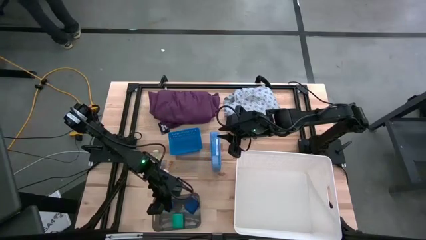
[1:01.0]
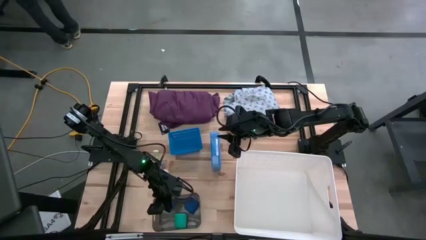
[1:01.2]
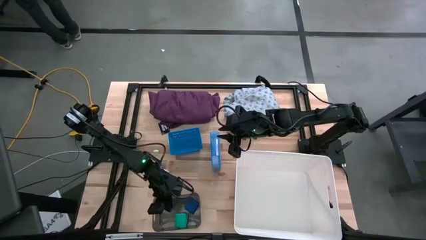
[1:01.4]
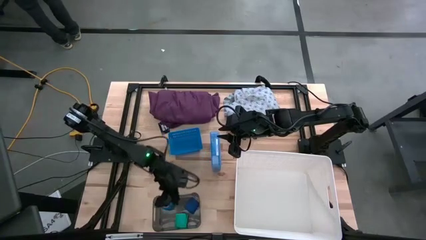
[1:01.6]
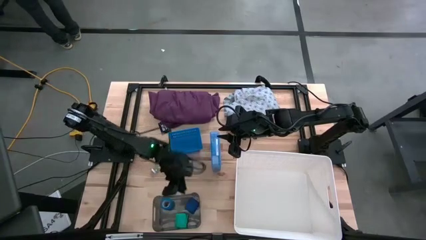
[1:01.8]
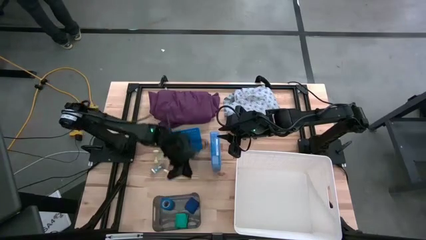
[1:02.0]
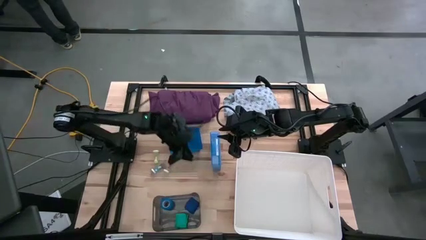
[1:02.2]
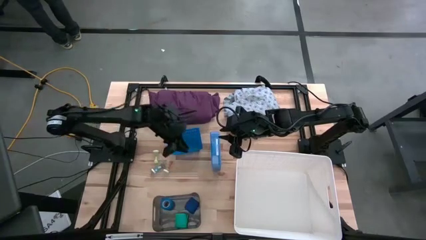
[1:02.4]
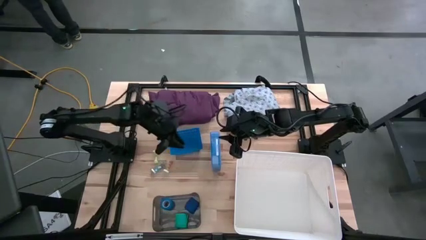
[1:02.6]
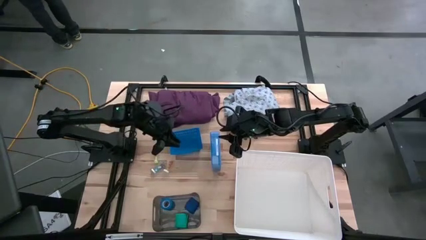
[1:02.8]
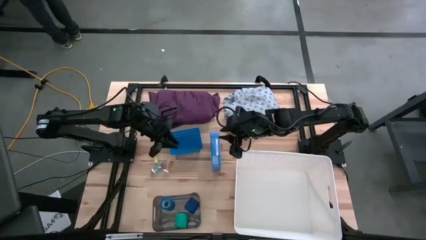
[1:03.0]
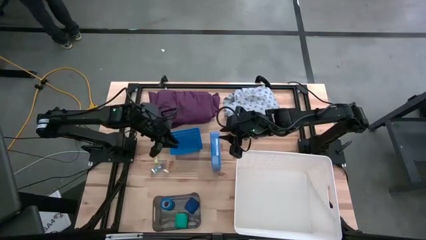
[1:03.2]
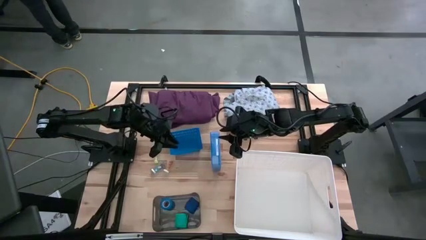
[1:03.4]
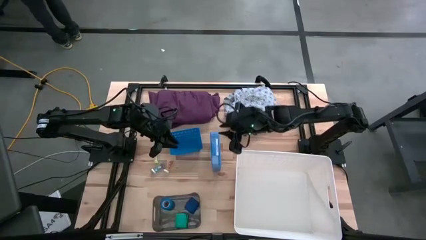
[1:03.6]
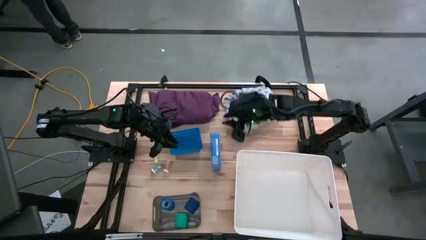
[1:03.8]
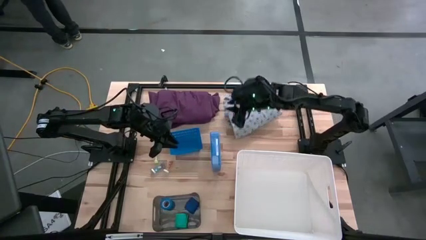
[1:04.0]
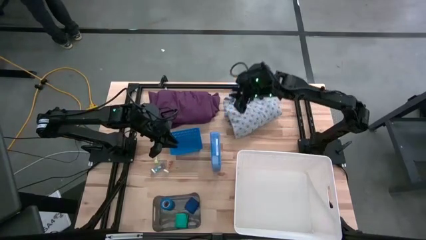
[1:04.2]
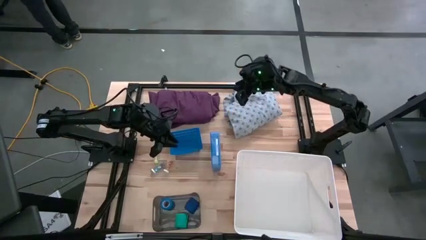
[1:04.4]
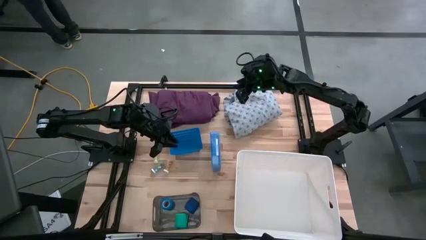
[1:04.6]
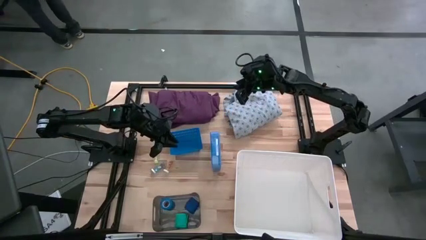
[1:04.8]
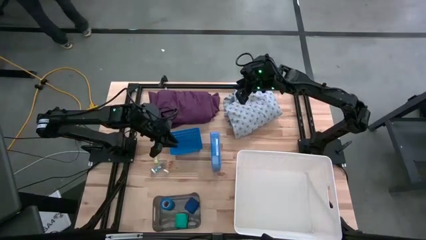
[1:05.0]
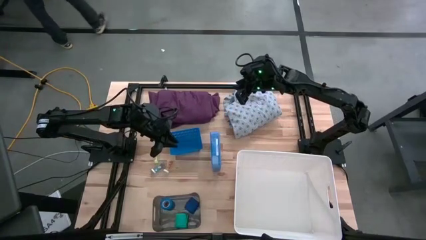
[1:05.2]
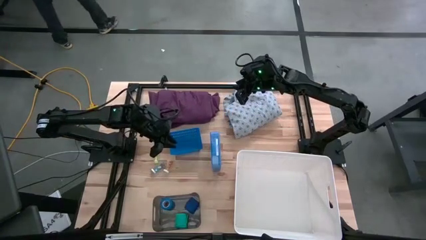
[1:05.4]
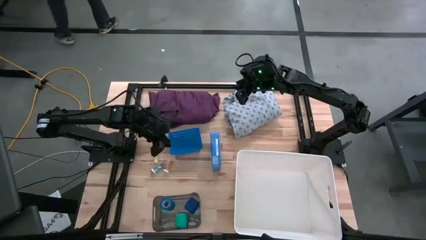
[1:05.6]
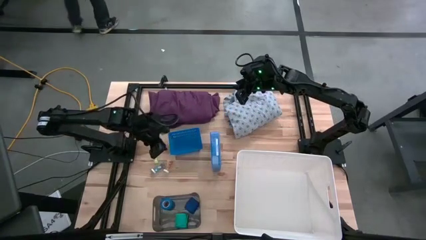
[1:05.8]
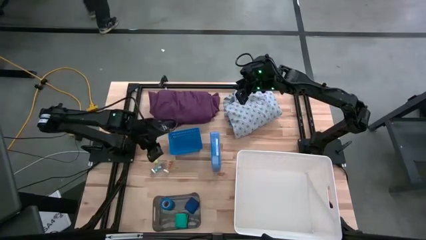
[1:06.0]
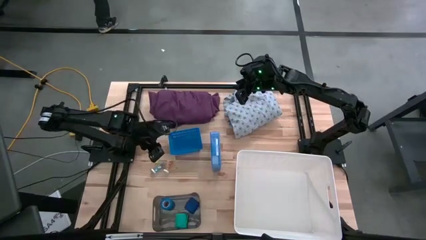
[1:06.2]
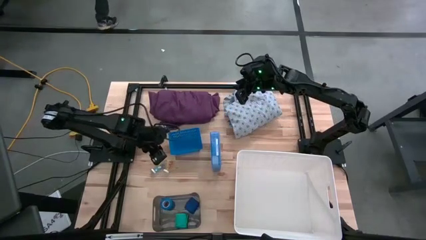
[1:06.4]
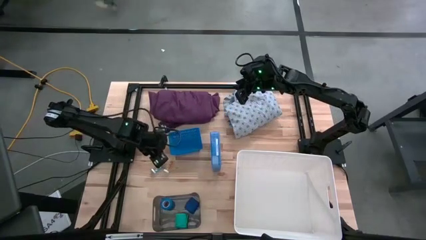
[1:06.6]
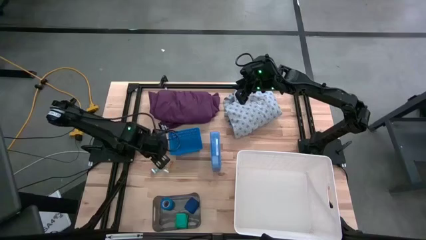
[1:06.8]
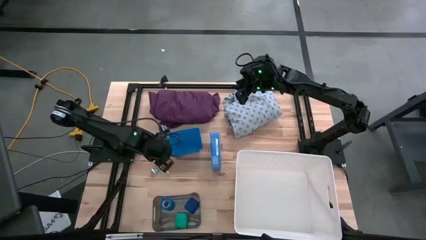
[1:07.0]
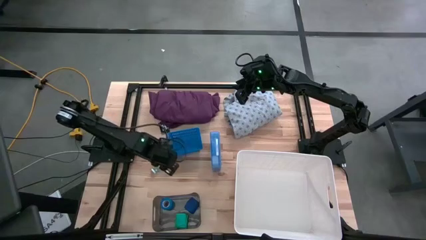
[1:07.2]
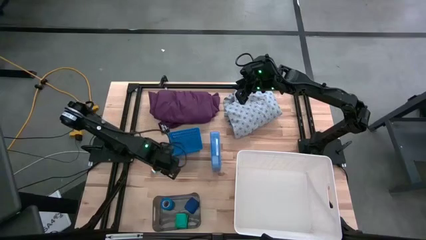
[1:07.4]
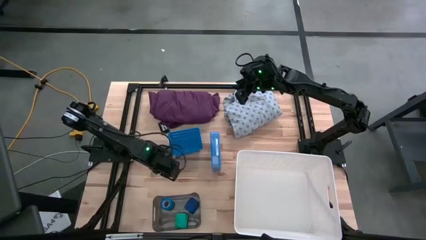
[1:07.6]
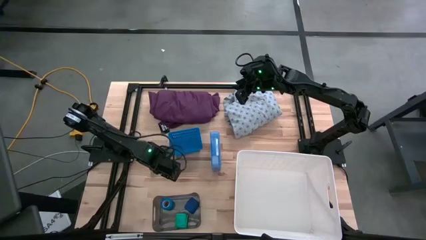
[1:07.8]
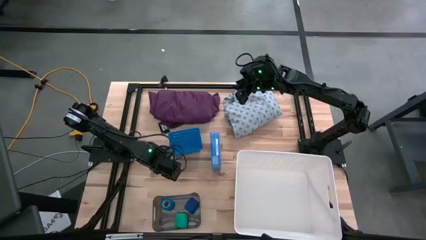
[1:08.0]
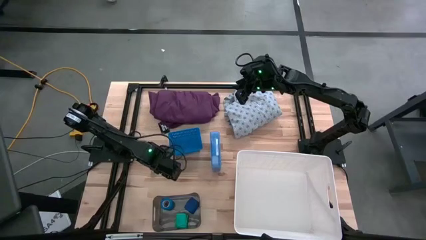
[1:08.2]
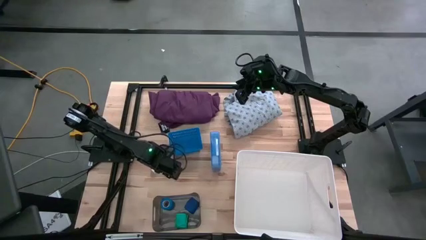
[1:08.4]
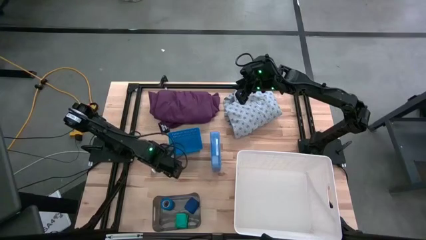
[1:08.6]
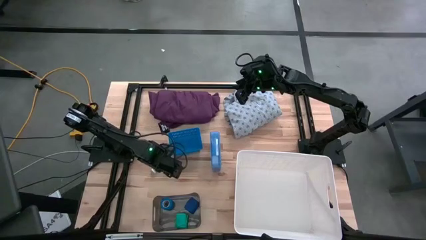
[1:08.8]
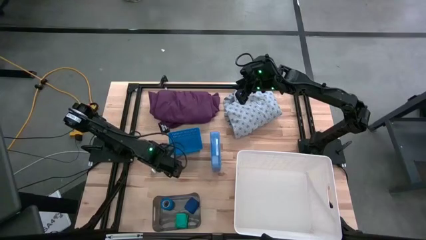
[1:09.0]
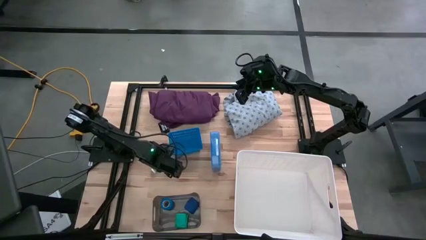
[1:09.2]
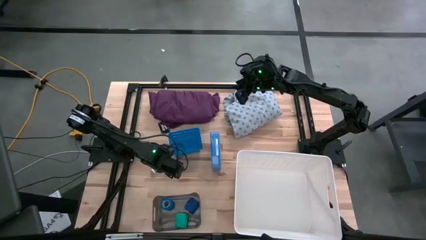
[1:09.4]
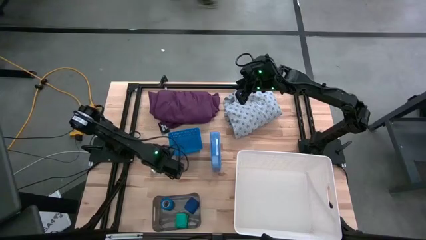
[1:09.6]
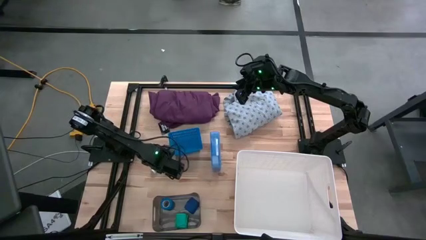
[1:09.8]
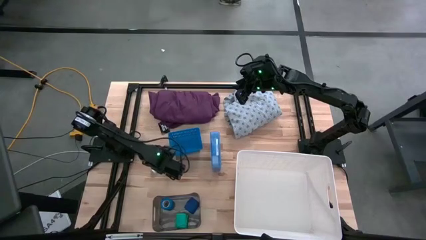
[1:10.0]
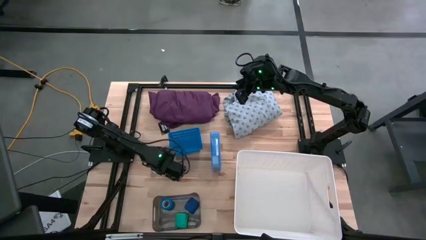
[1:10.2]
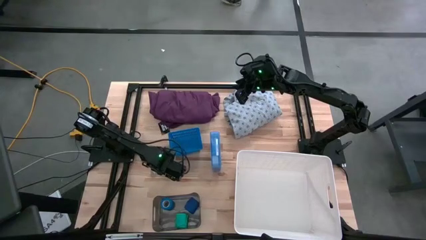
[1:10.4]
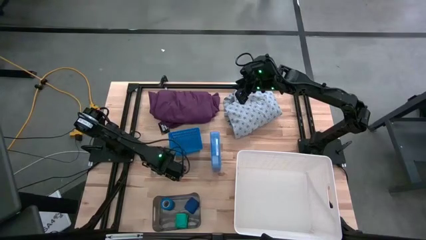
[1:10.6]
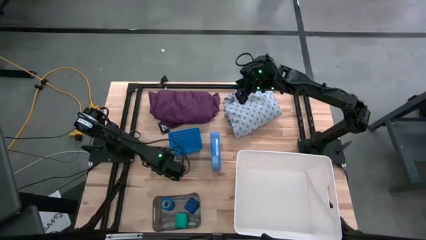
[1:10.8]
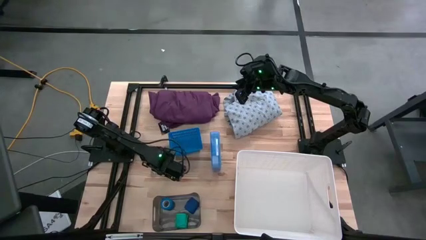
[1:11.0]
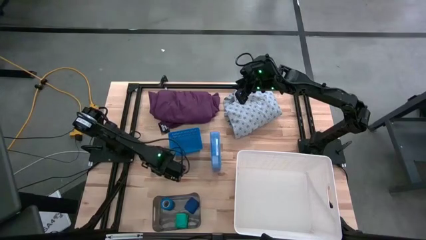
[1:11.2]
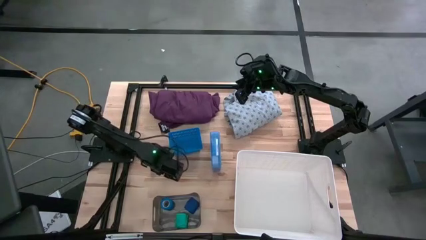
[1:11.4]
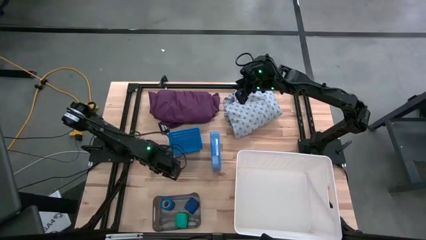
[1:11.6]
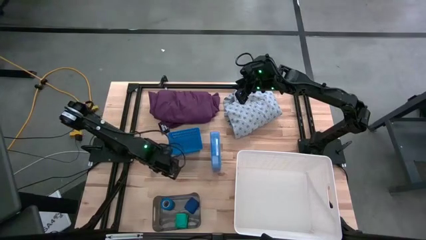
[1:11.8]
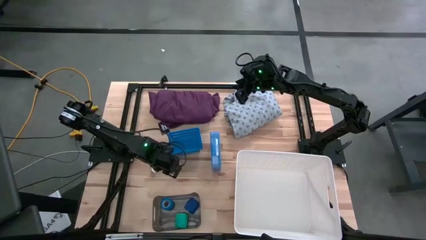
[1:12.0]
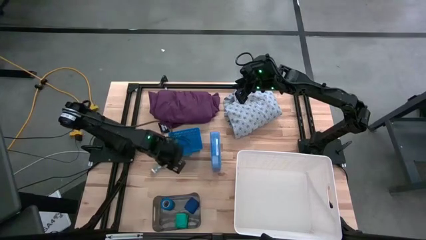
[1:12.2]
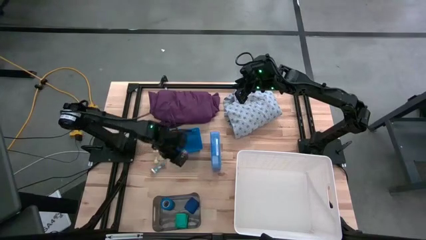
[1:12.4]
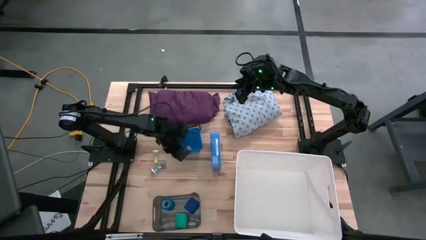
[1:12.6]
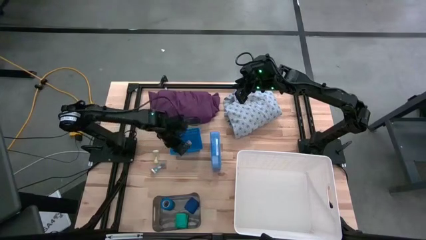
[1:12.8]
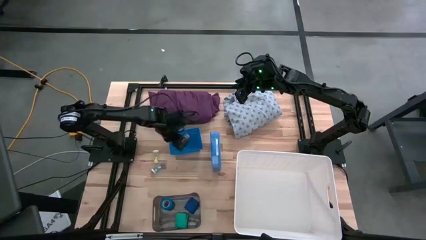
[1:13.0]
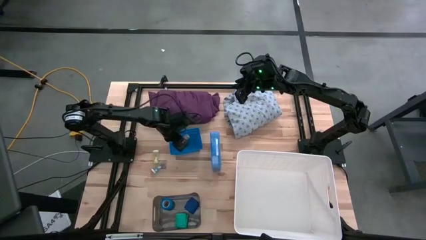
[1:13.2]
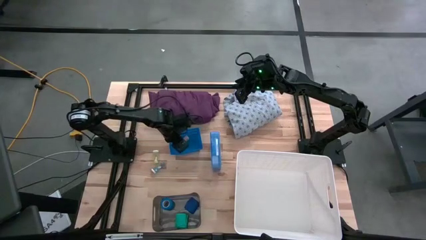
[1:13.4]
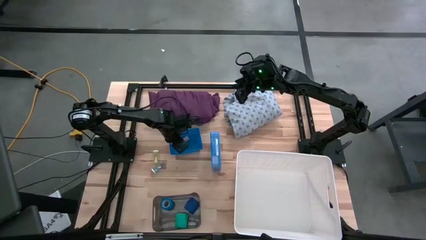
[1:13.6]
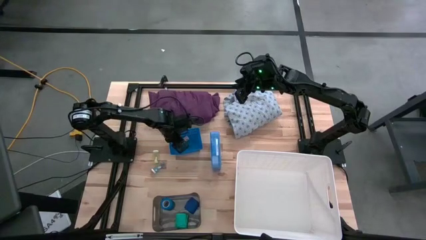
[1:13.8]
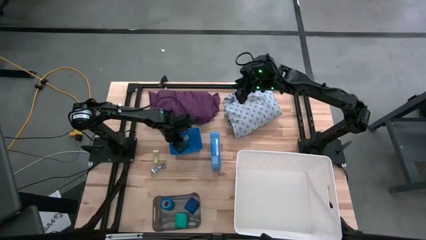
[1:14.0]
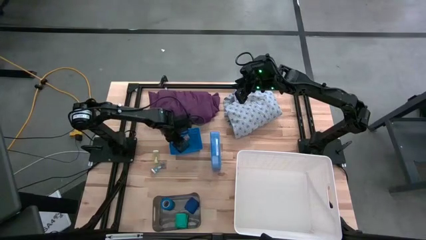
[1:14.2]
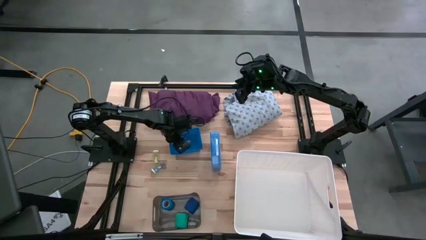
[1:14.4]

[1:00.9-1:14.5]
Task: Pick & Place Medicine items
Put the right yellow pill bottle into the blue bin
